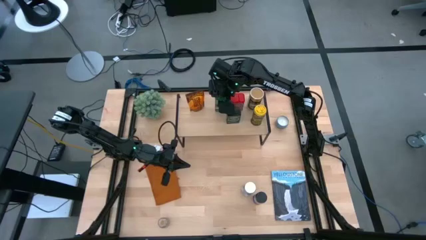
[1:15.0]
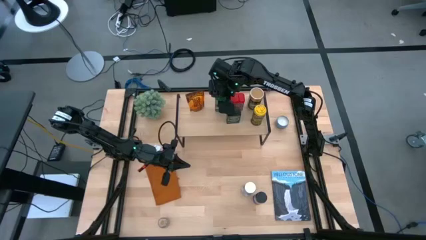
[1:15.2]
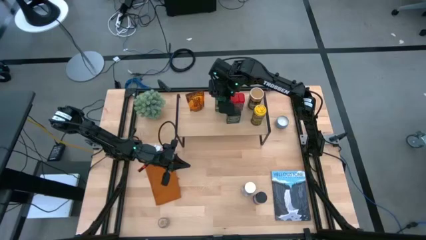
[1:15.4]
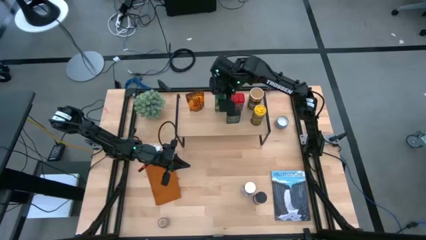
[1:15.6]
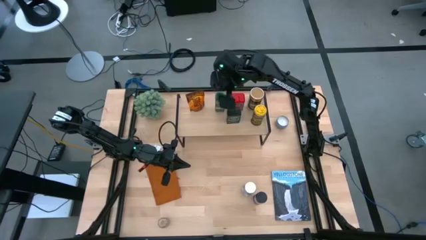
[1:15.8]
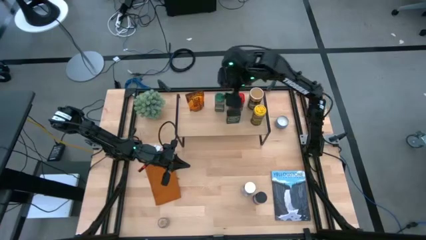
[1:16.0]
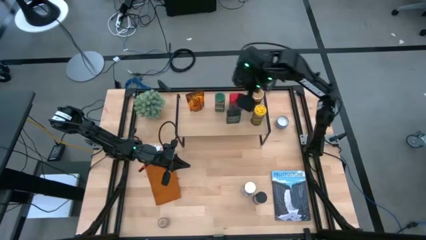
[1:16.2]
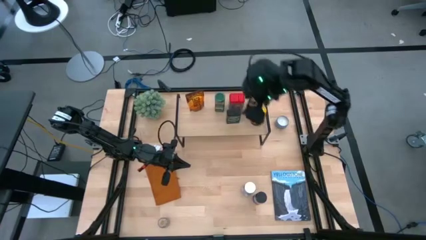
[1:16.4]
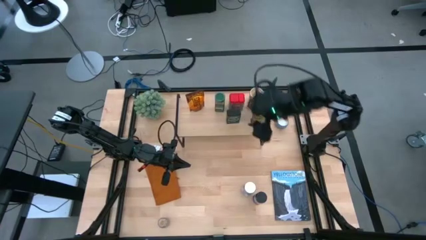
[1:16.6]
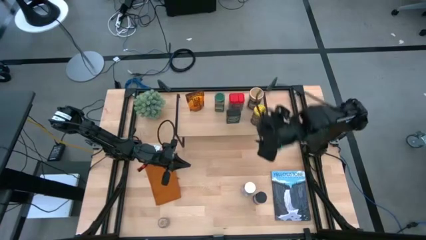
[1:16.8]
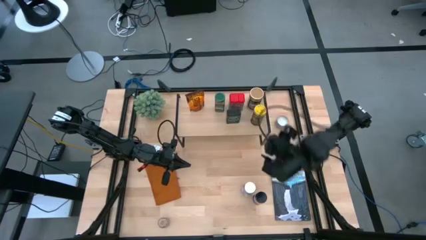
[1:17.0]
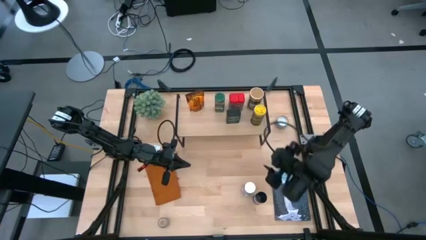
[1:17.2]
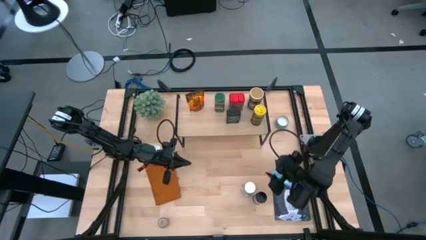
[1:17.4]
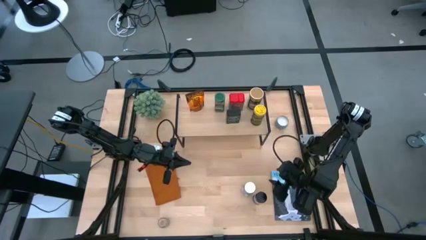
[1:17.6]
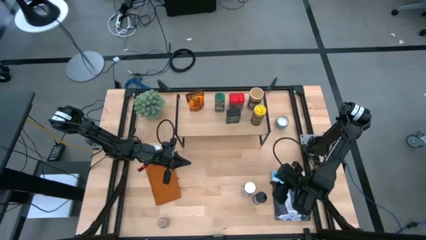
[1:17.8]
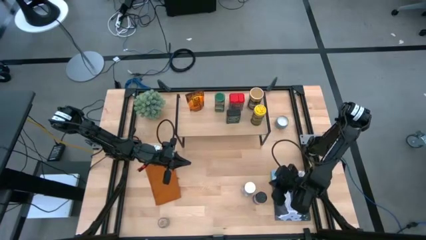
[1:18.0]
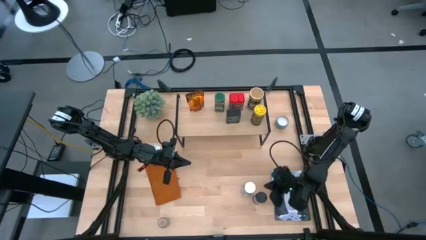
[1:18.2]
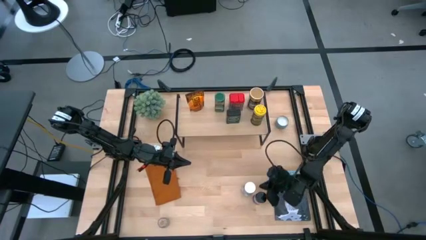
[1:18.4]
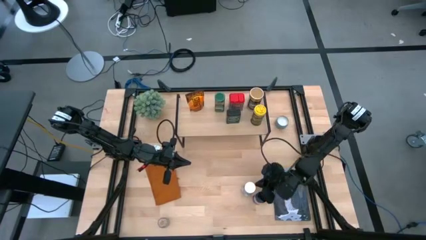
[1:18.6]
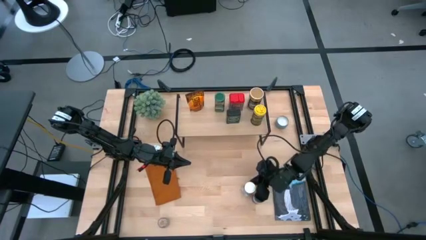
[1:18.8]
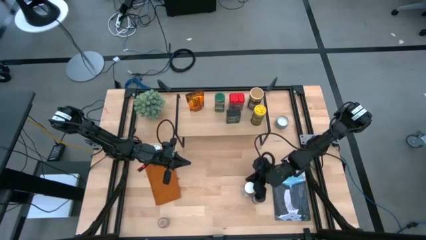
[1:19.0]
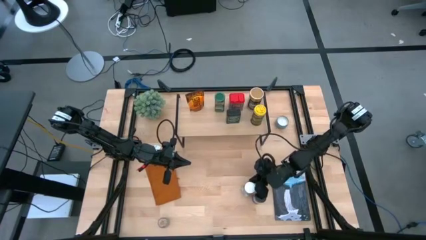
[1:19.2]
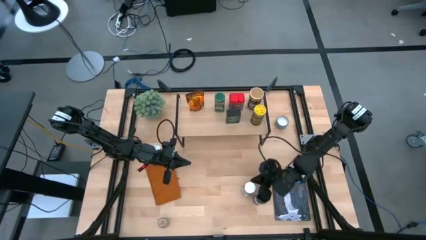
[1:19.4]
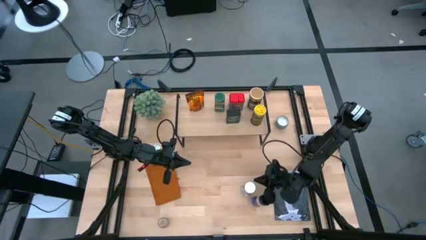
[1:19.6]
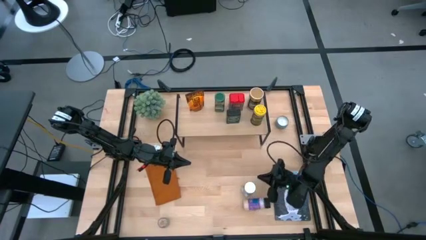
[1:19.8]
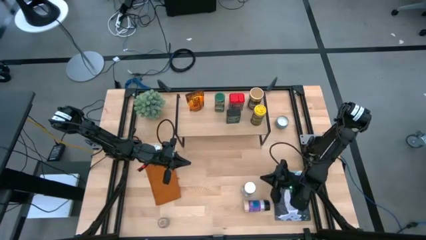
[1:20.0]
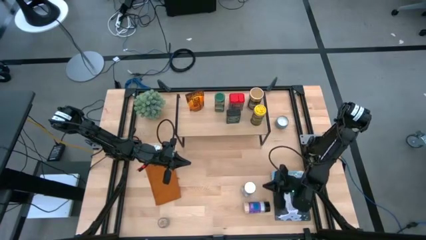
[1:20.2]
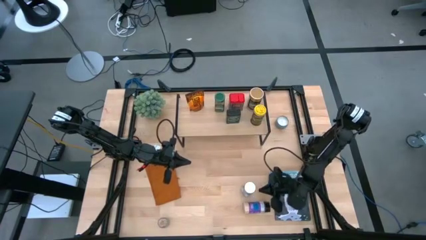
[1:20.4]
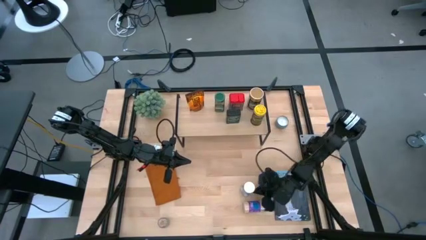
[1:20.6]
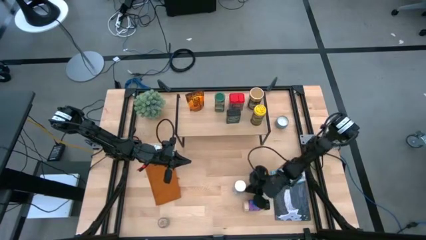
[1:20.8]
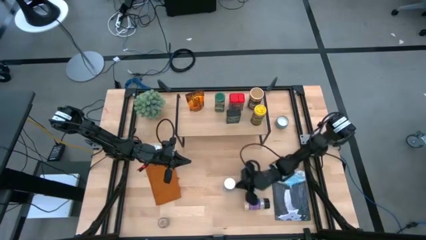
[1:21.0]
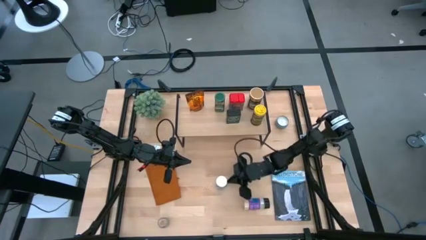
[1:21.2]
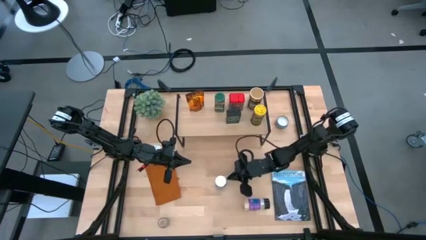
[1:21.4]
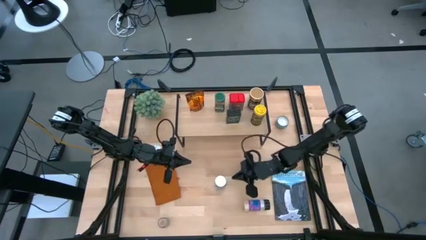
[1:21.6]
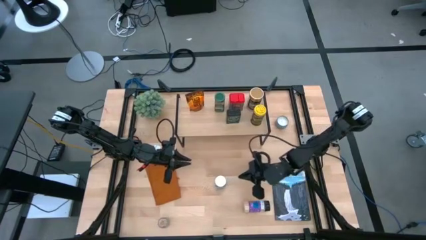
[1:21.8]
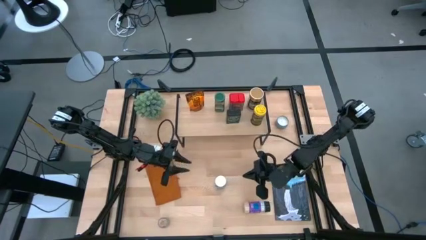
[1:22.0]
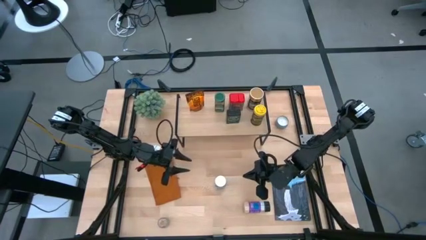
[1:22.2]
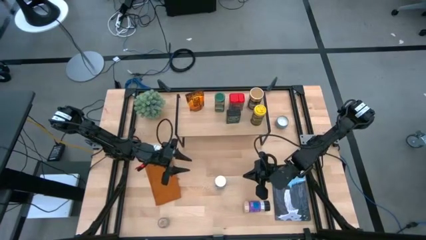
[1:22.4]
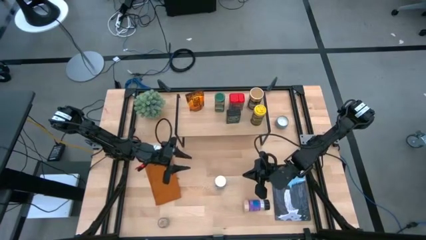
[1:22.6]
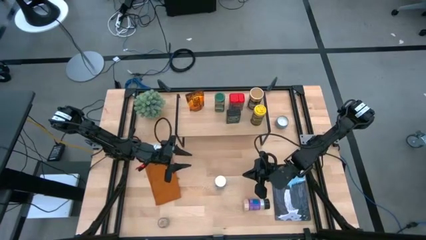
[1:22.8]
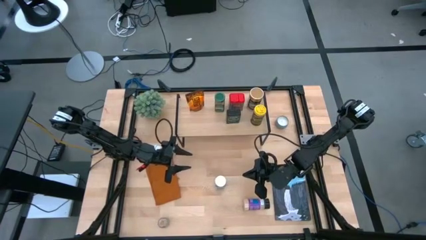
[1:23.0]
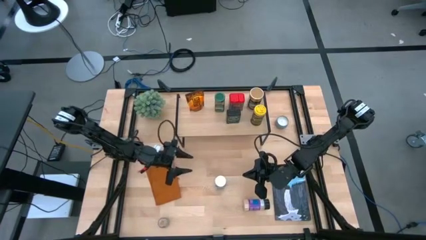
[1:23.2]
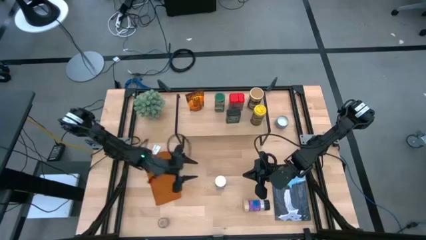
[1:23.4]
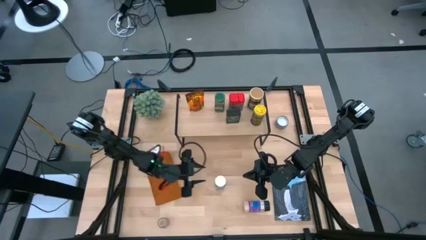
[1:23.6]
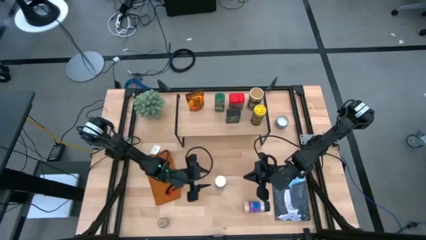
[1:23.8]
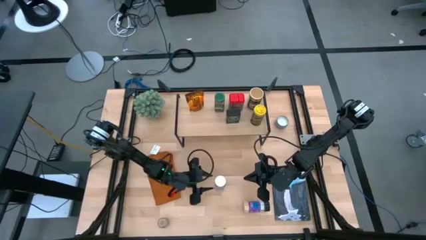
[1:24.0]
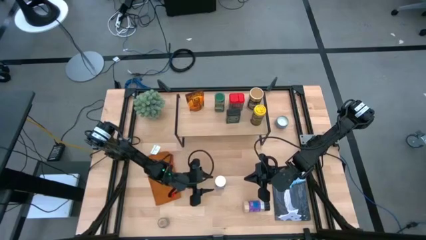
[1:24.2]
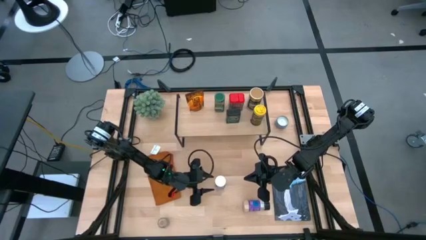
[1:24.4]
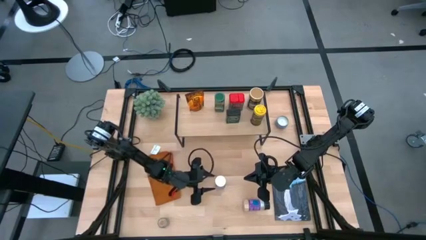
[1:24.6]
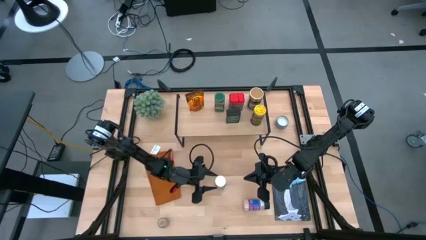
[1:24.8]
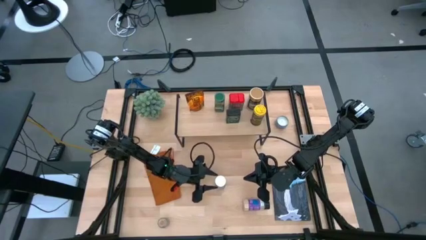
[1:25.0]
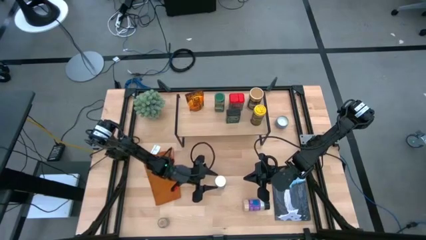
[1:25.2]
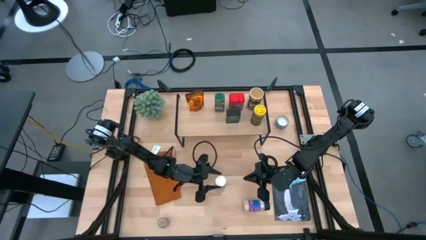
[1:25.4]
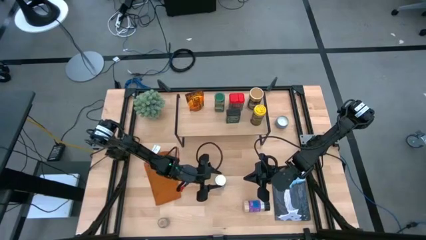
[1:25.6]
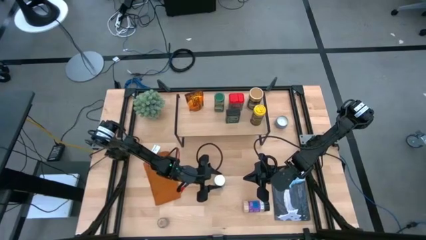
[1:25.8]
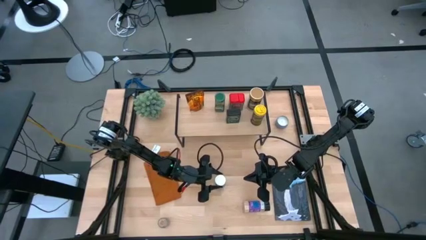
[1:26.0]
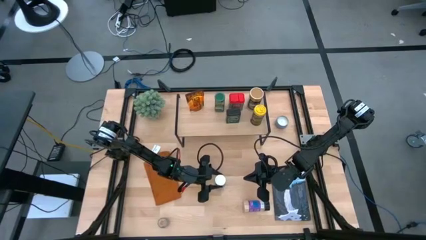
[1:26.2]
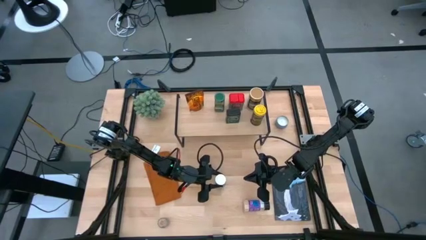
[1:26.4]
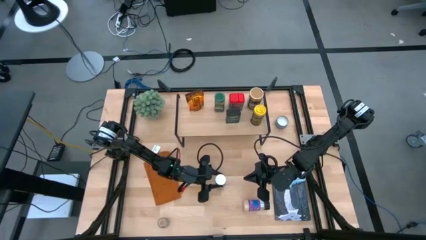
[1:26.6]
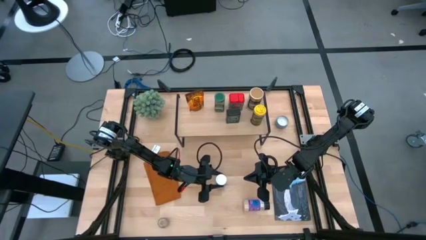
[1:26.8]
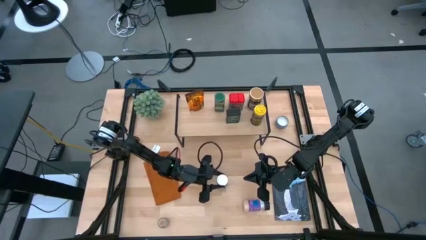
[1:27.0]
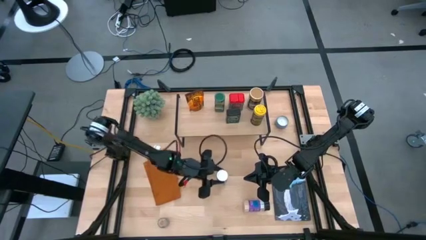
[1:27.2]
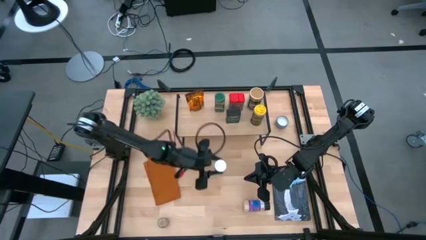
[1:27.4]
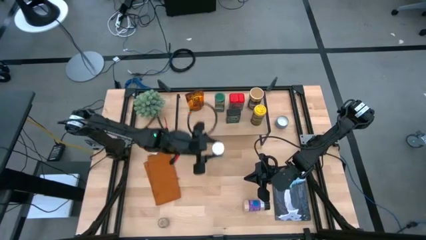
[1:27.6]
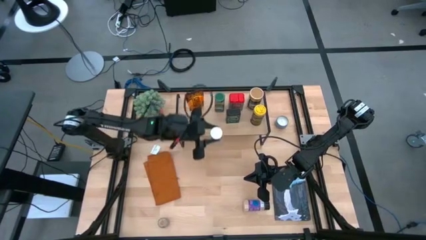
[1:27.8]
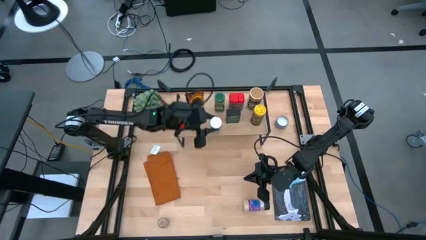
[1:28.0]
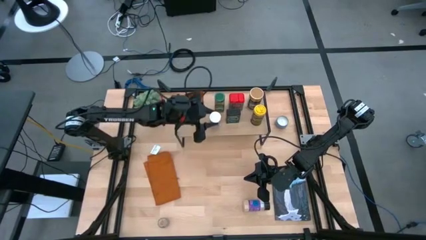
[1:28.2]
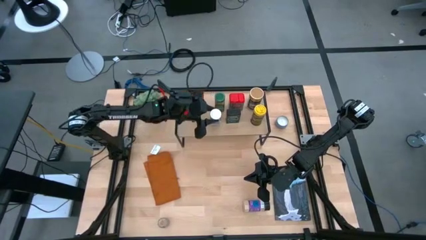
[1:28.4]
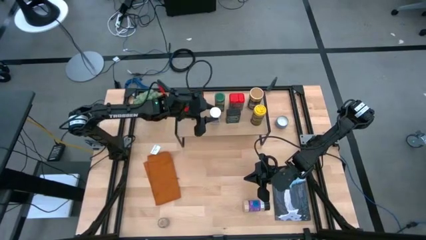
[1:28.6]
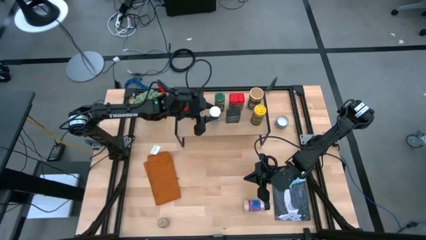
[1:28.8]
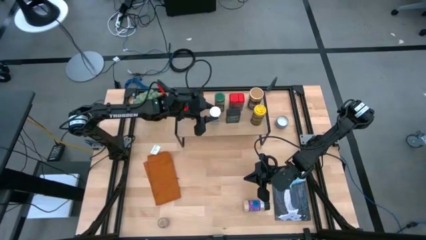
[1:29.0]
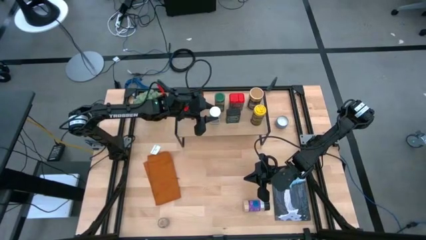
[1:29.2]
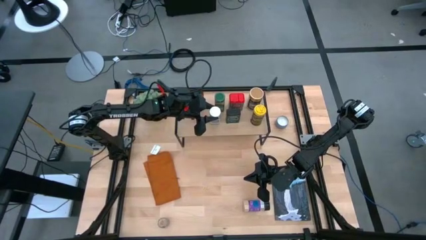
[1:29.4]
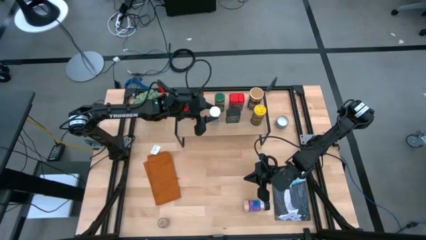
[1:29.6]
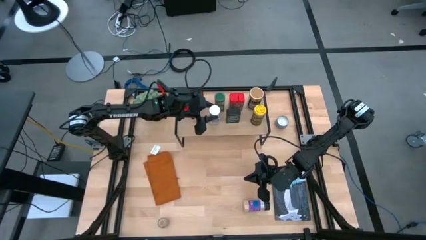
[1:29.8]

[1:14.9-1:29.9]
Task: Shelf spices
Put the white seasoning bottle on the shelf

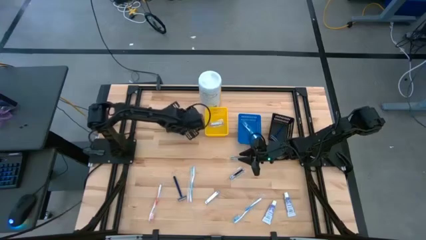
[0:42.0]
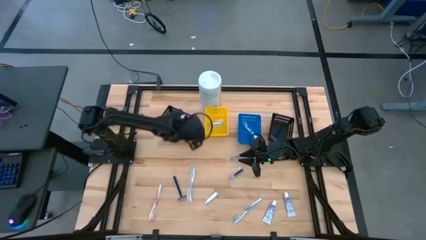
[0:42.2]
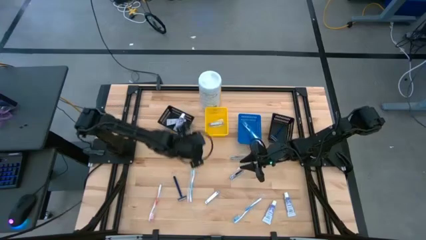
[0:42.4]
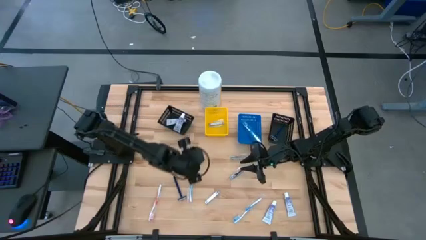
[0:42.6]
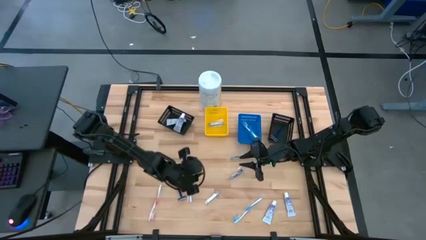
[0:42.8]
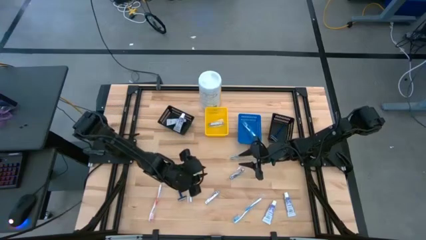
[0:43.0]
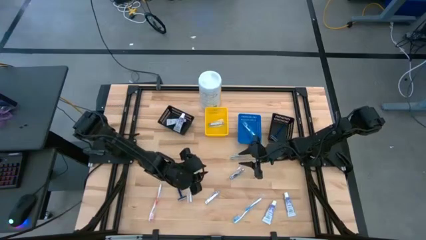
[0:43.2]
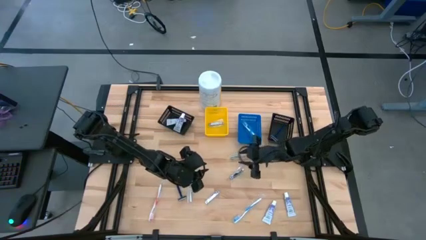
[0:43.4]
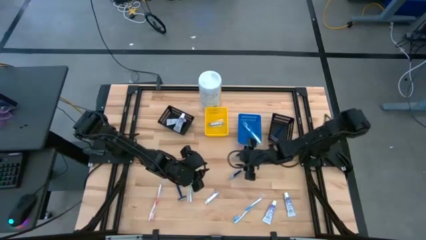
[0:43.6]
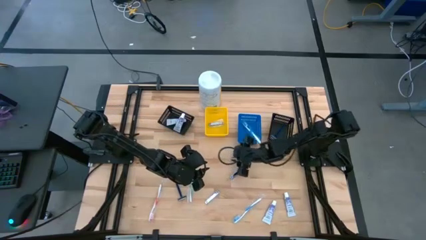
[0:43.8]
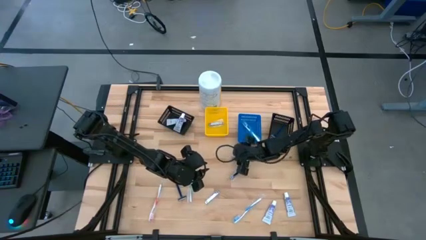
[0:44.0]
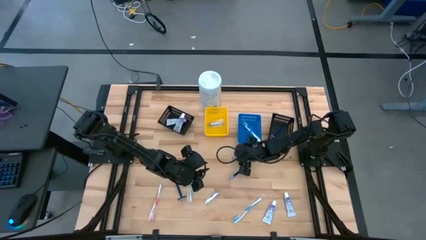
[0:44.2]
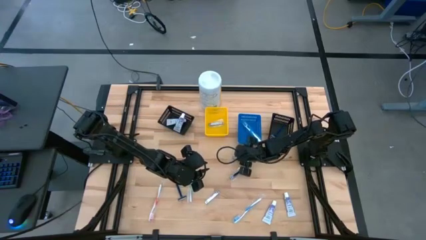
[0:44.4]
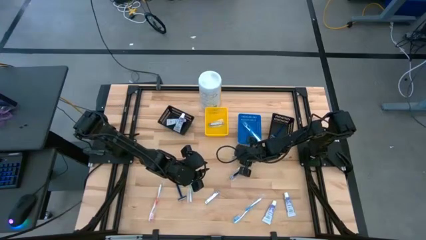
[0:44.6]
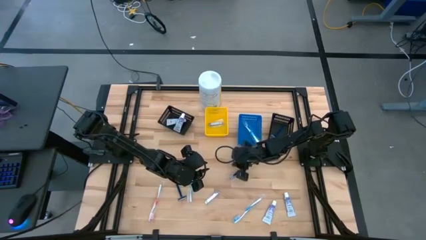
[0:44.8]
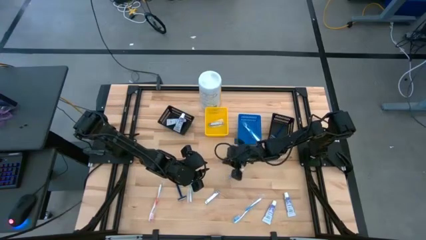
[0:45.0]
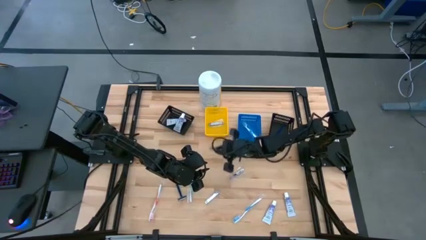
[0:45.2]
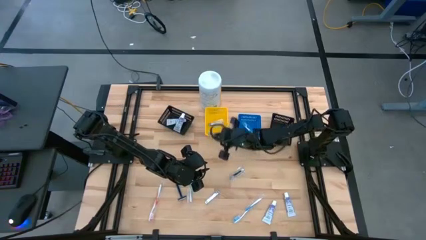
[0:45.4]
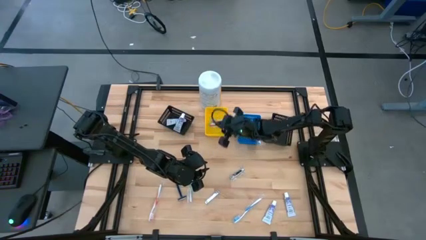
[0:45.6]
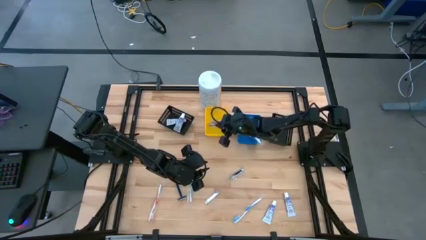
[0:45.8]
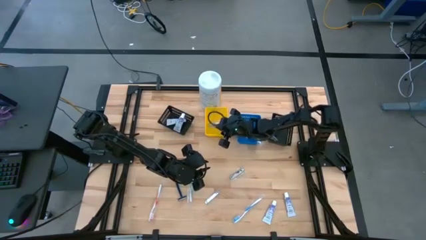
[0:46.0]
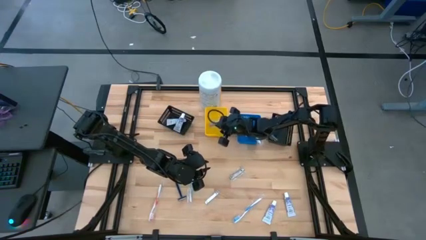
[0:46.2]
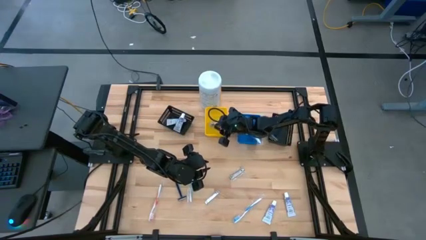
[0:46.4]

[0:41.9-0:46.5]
Task: Pick & Place Travel size toiletries
Put the silver nail cutter into the yellow bin
